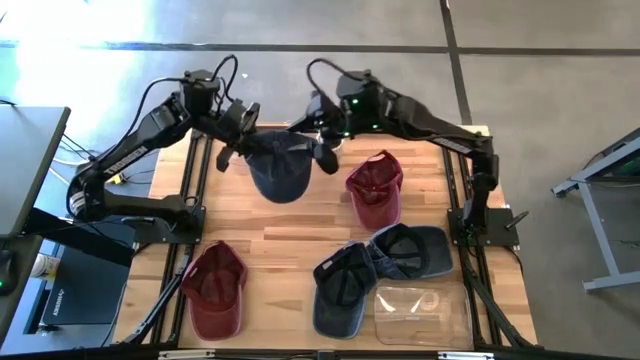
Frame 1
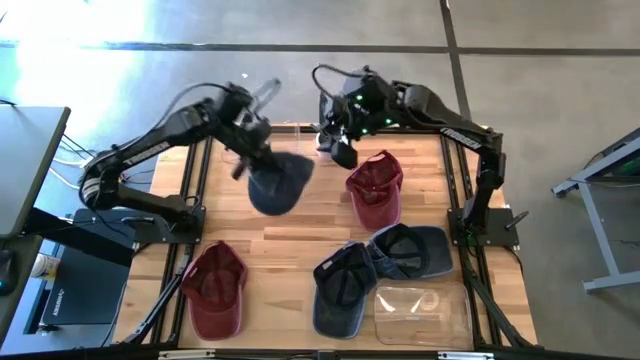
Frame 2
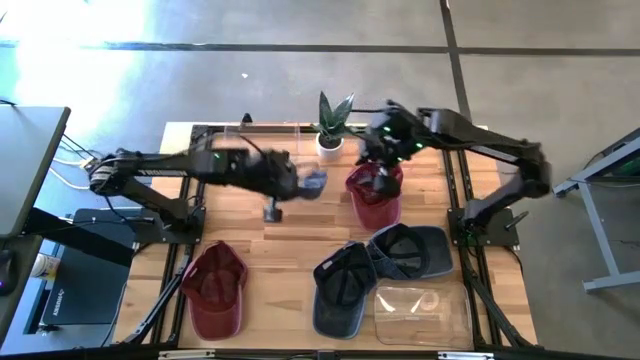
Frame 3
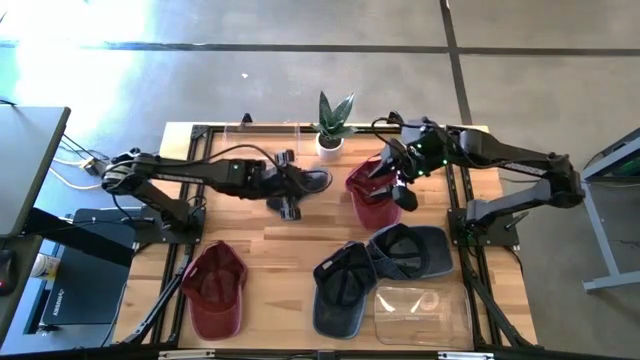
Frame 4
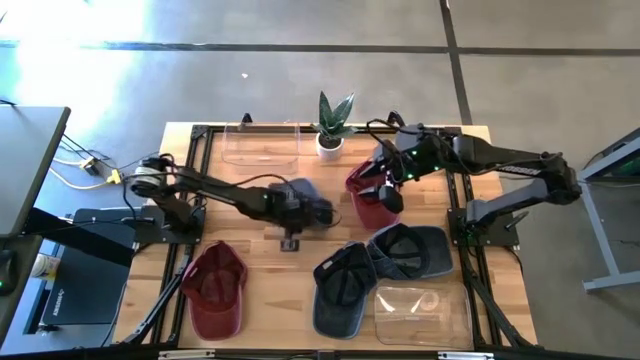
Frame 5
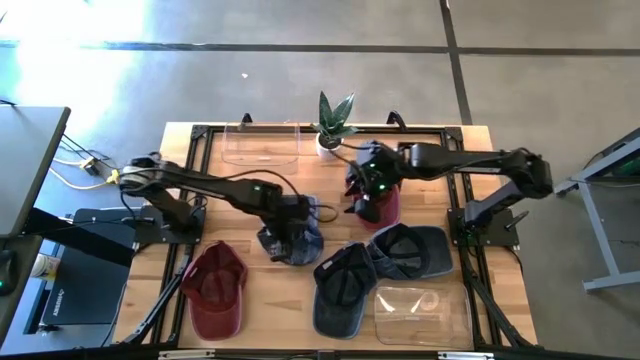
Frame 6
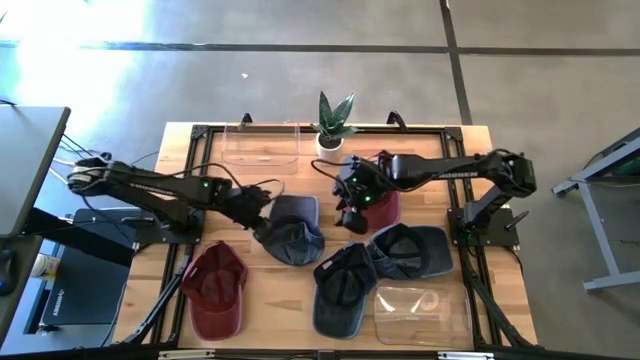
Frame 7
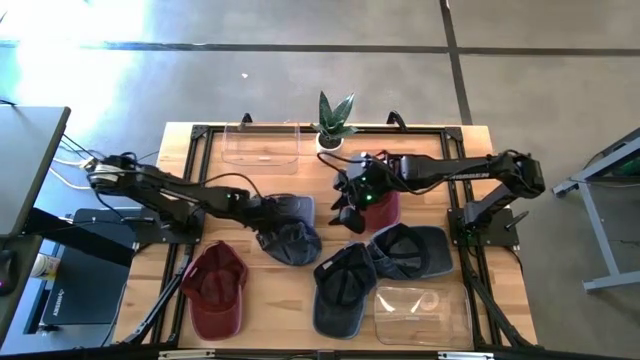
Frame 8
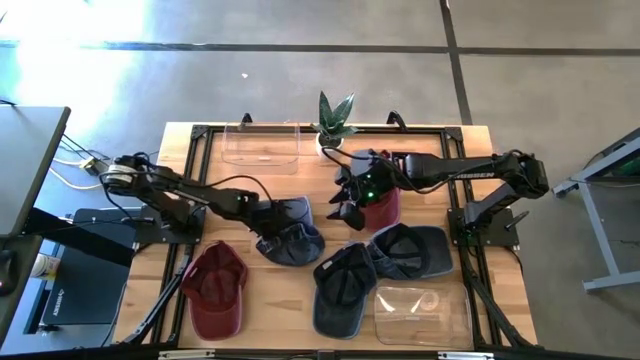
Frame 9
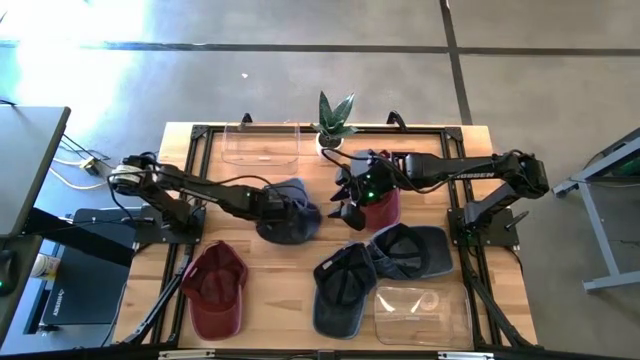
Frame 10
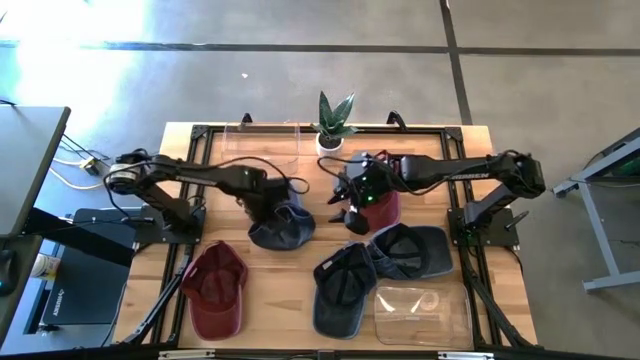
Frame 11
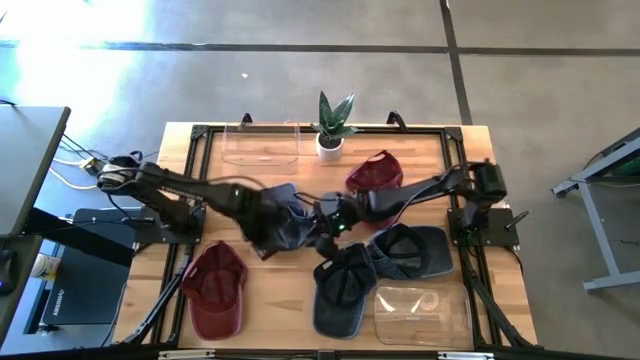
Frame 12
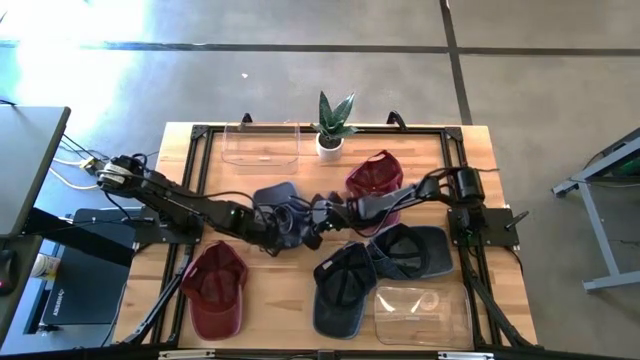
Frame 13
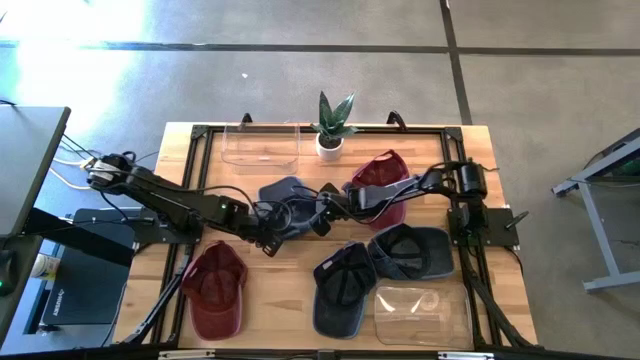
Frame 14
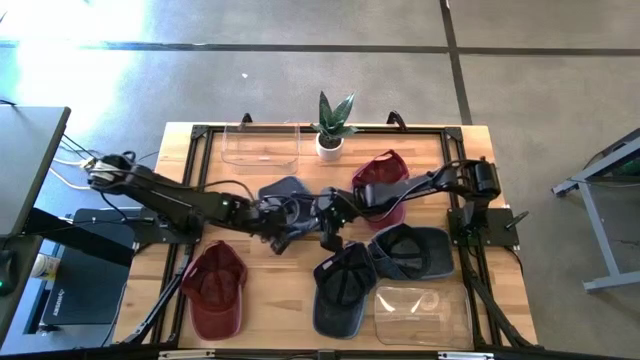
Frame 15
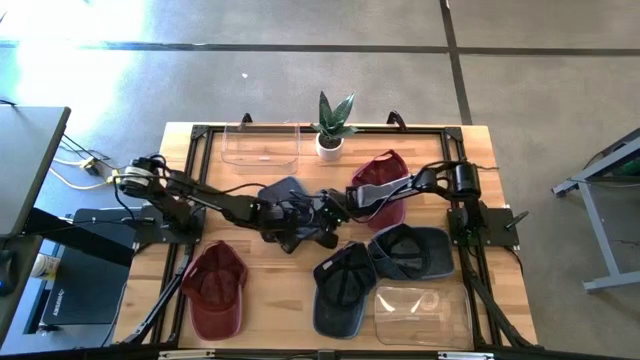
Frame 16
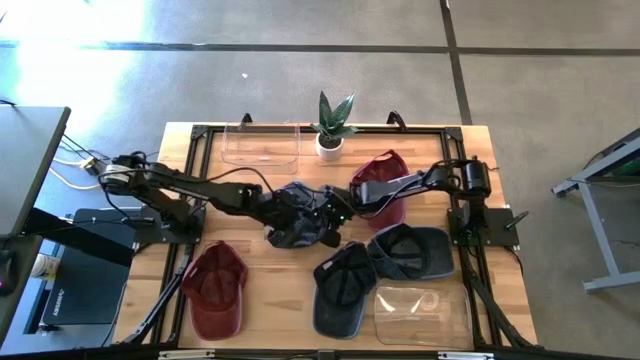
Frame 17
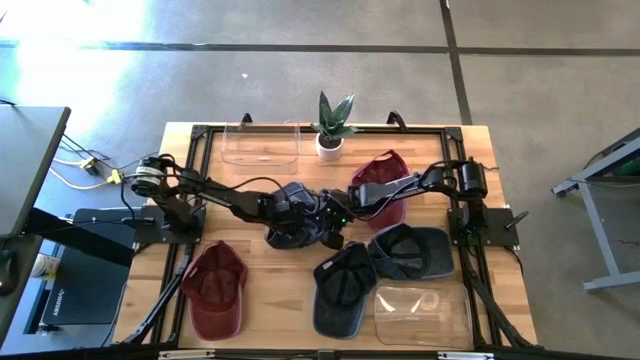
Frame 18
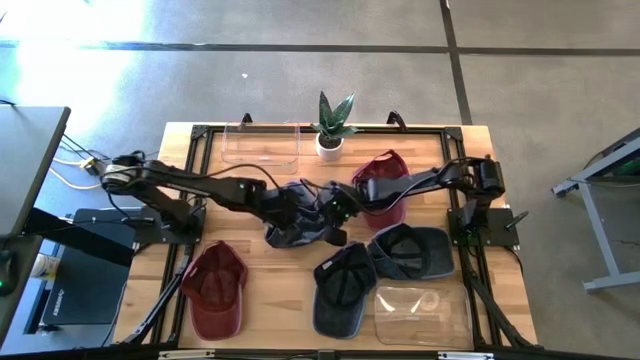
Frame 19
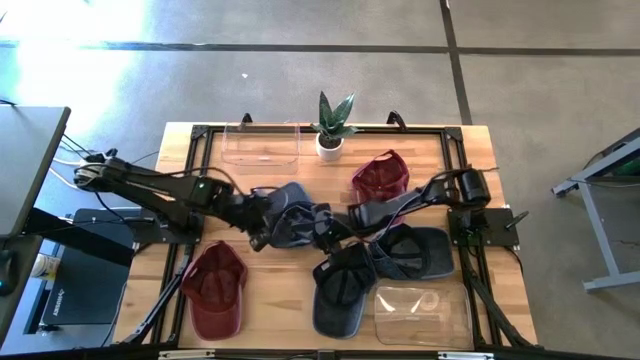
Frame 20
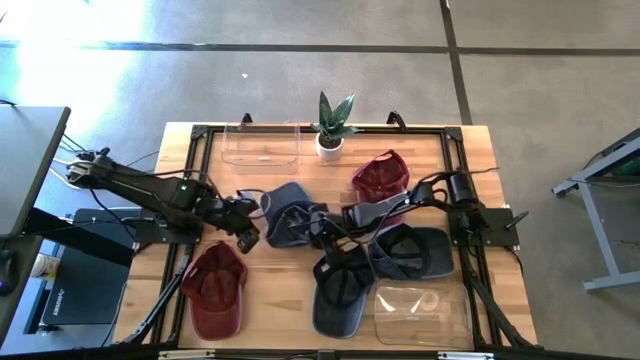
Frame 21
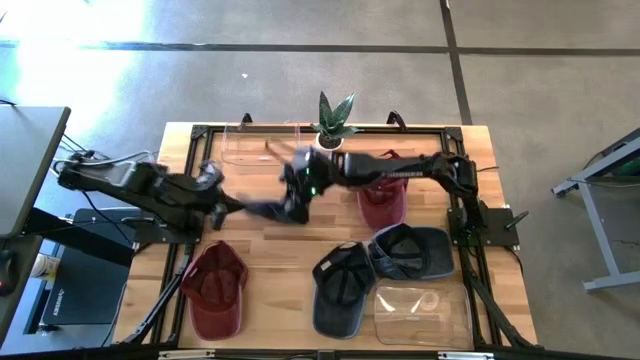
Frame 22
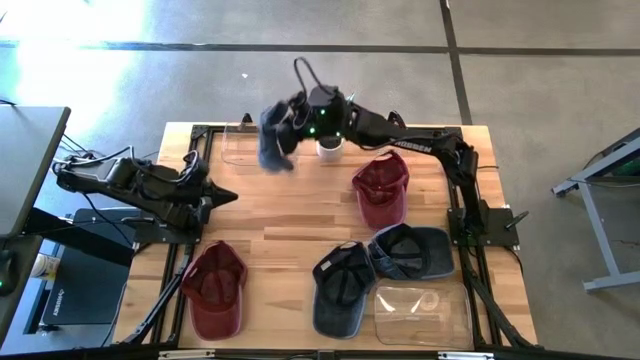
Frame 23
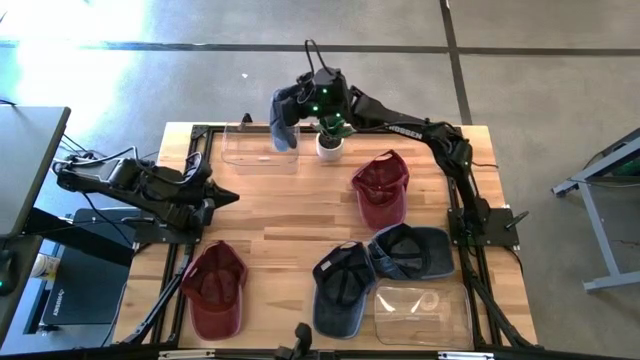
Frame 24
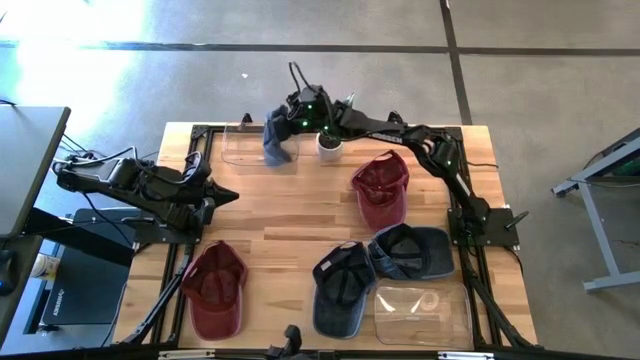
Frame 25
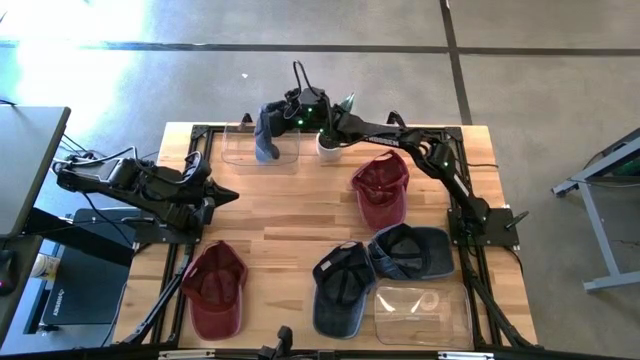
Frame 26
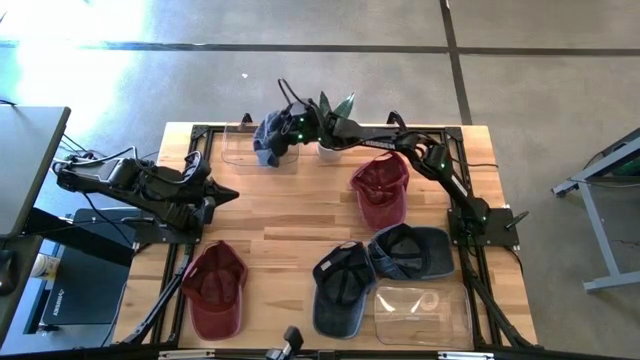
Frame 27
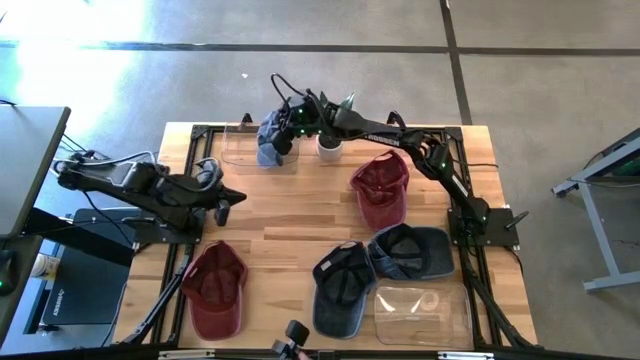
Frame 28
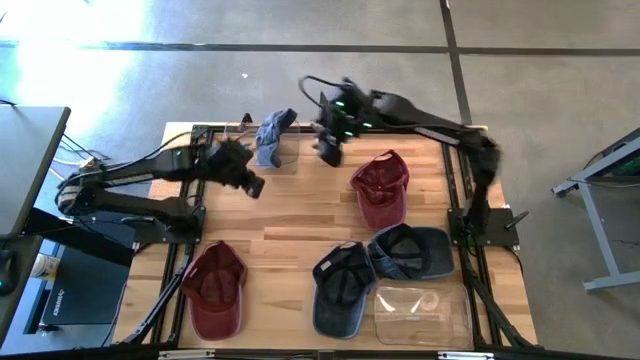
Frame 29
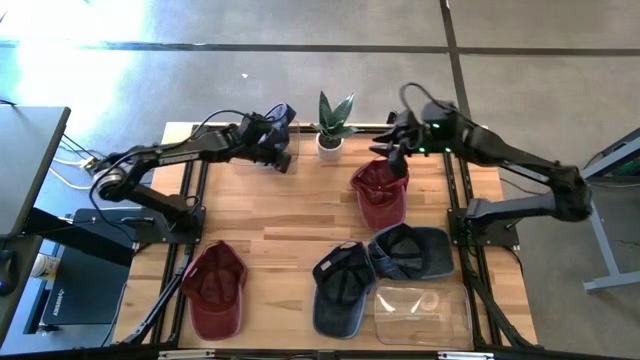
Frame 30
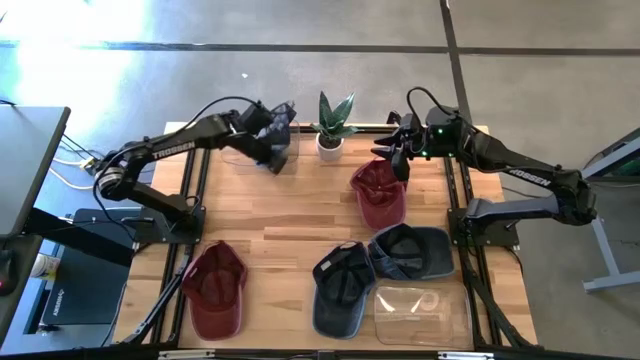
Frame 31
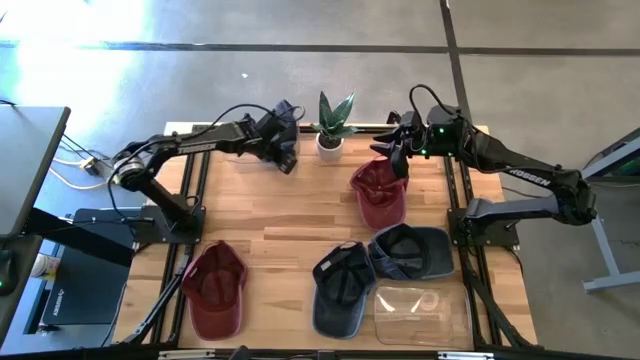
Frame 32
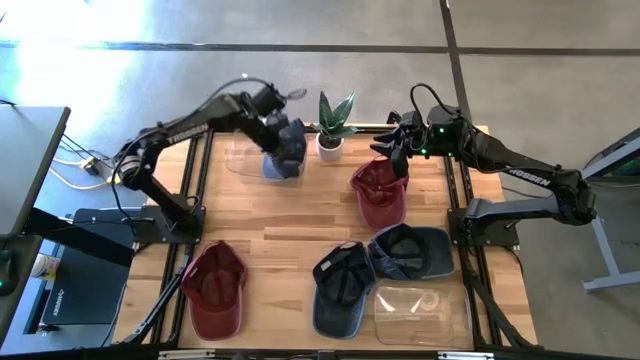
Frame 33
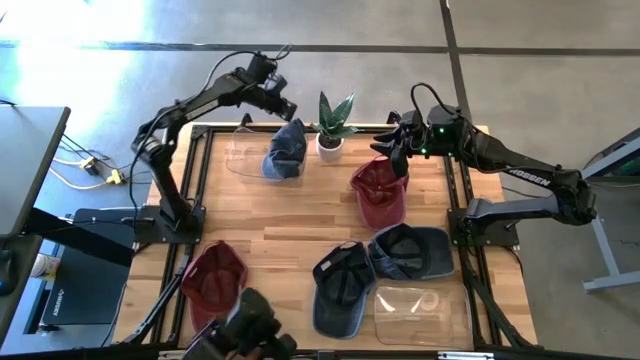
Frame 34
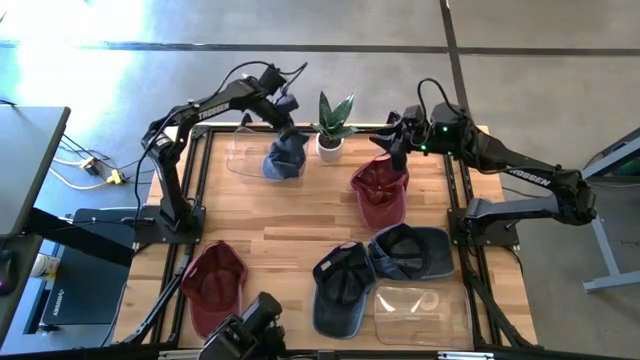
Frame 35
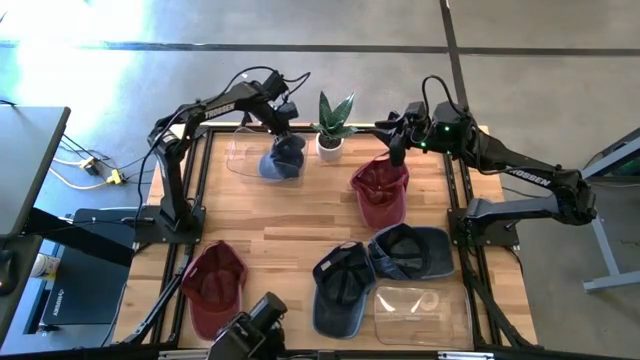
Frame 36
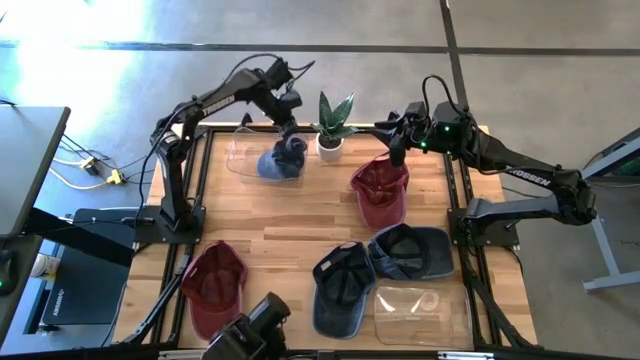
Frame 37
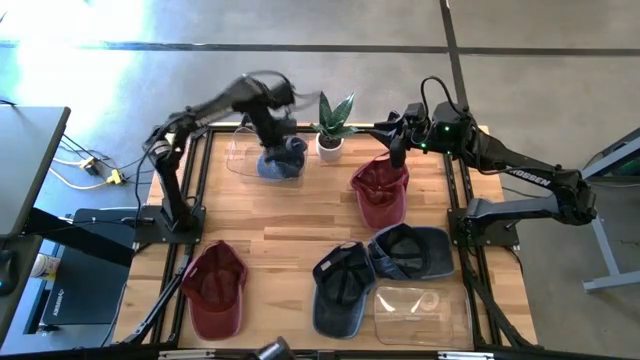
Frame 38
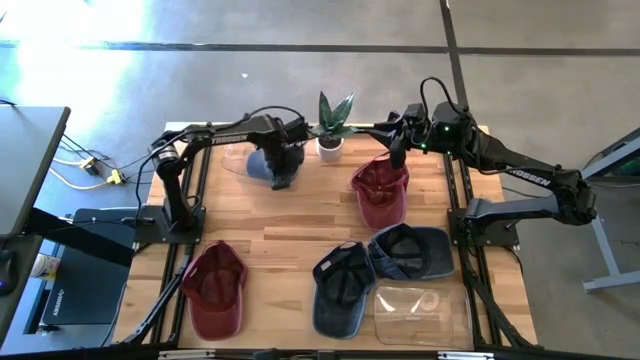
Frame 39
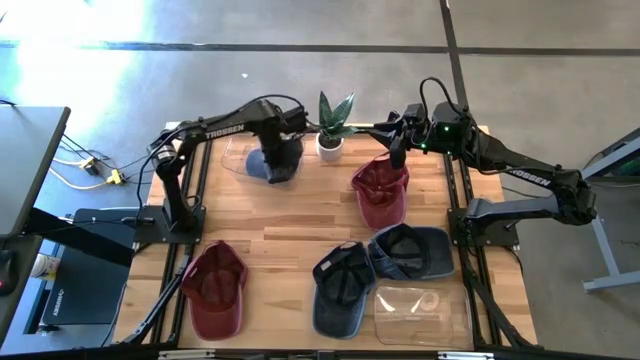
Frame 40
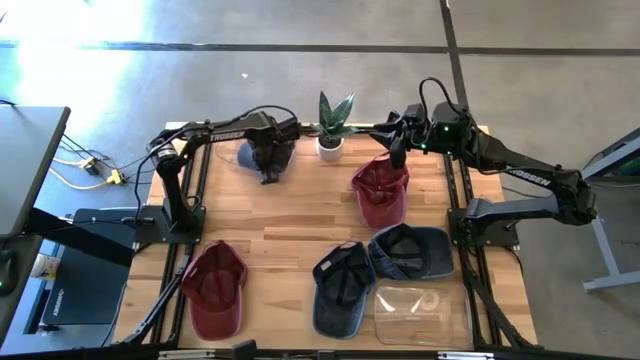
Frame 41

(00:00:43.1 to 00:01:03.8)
Task: Pick & Place hat
Put the left blue cap into the top transparent bin
